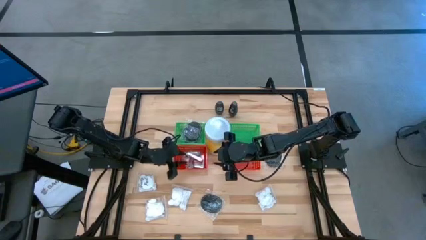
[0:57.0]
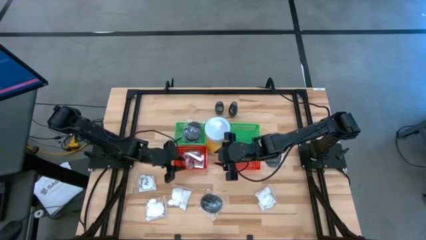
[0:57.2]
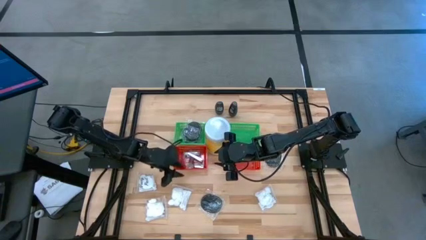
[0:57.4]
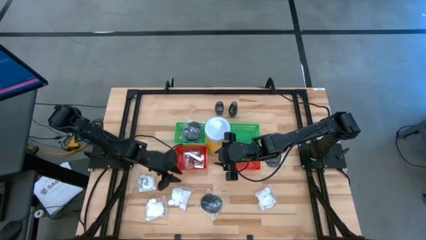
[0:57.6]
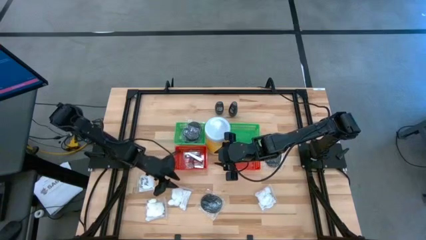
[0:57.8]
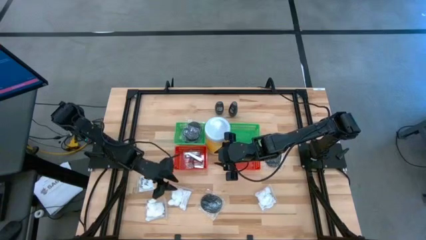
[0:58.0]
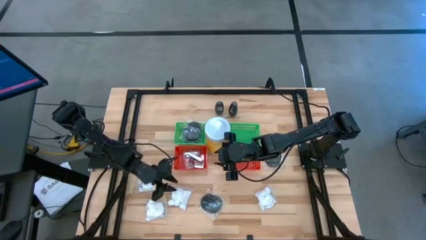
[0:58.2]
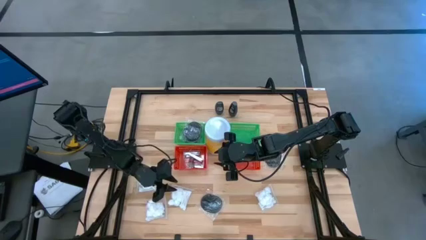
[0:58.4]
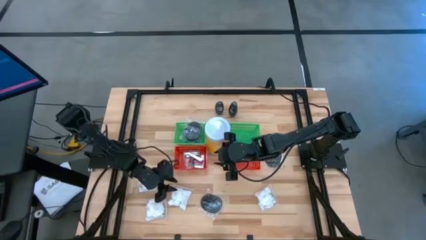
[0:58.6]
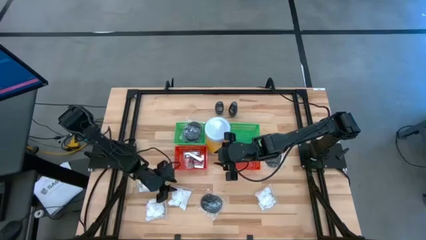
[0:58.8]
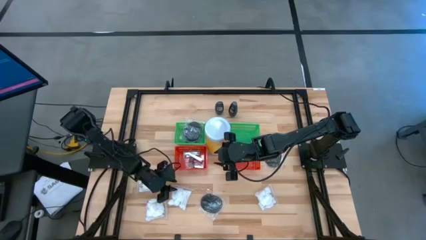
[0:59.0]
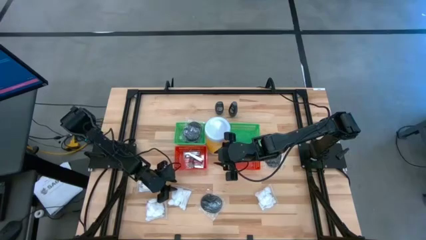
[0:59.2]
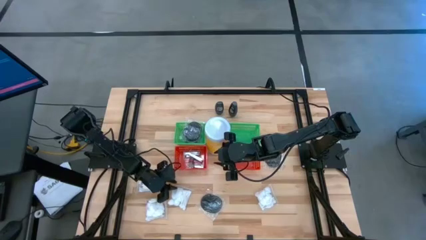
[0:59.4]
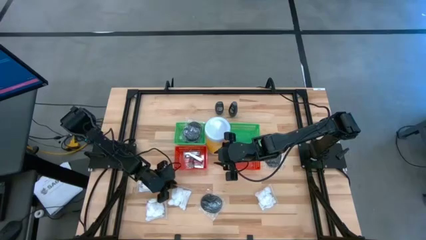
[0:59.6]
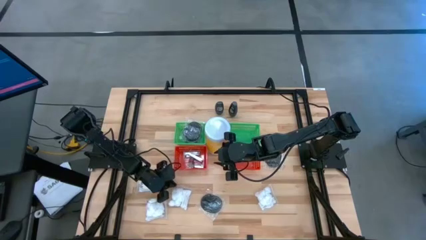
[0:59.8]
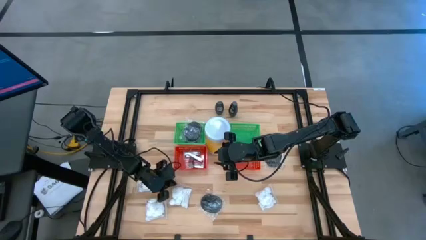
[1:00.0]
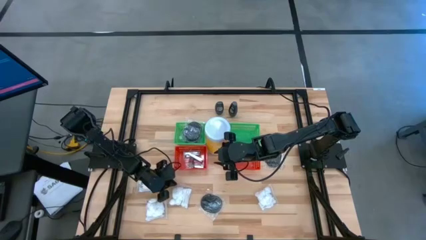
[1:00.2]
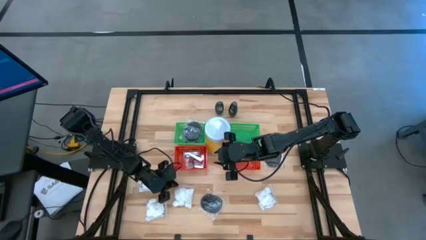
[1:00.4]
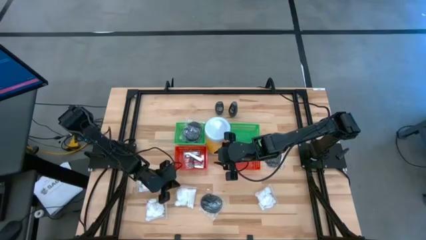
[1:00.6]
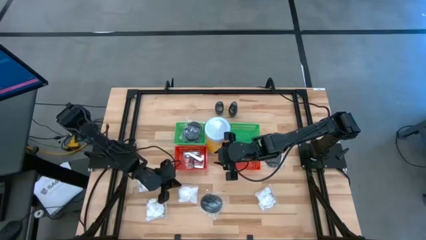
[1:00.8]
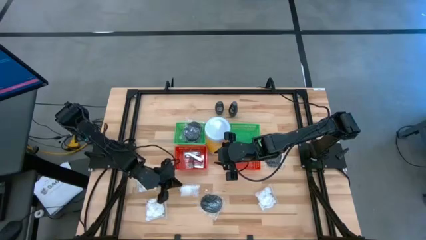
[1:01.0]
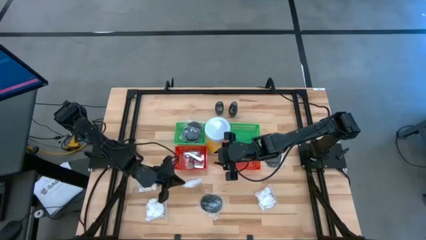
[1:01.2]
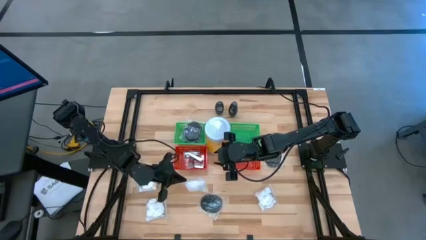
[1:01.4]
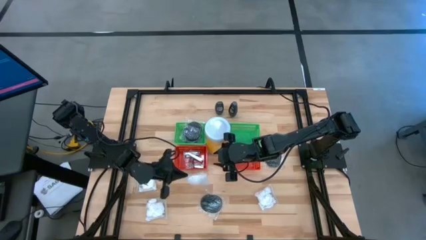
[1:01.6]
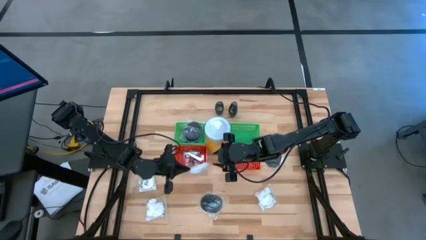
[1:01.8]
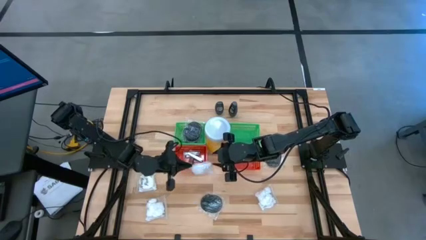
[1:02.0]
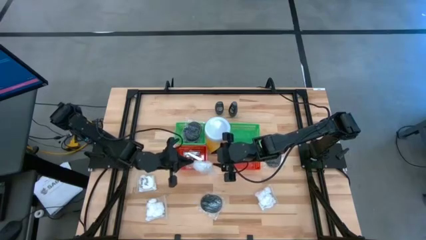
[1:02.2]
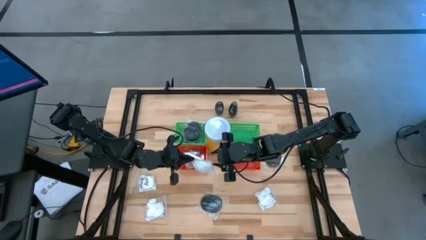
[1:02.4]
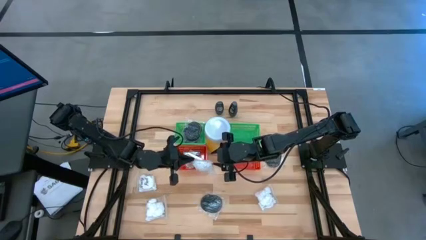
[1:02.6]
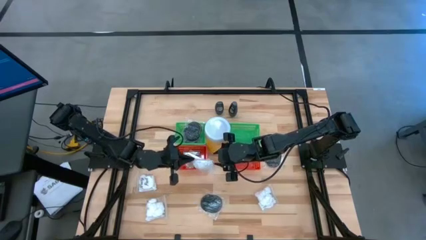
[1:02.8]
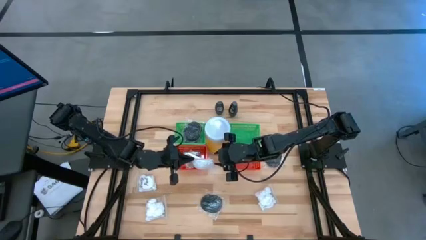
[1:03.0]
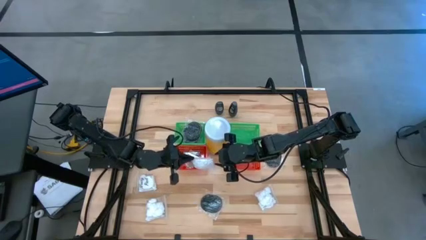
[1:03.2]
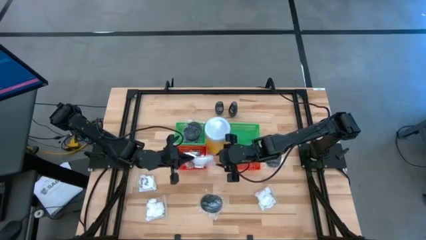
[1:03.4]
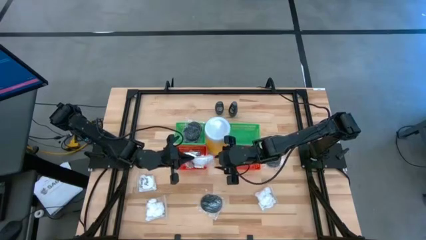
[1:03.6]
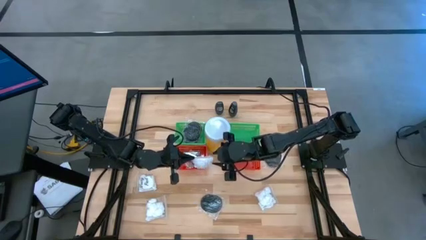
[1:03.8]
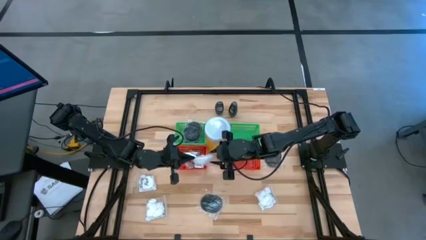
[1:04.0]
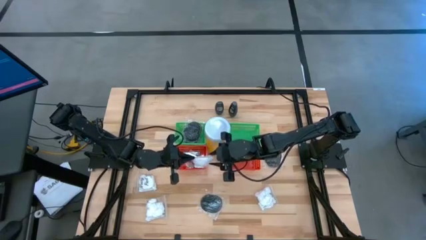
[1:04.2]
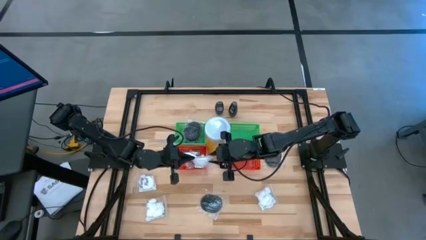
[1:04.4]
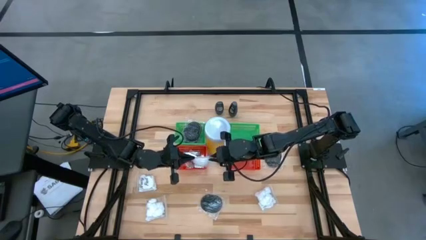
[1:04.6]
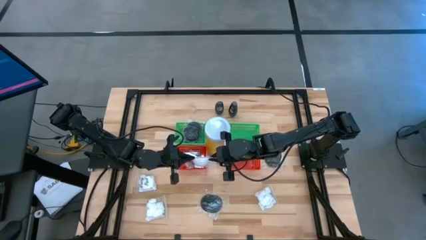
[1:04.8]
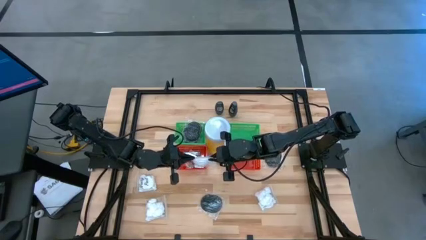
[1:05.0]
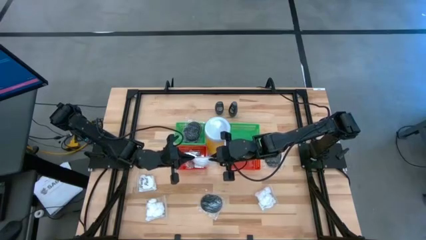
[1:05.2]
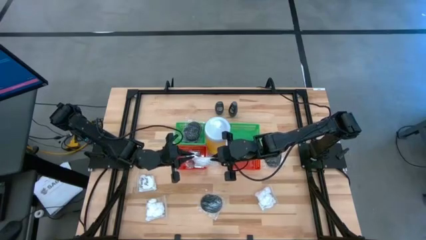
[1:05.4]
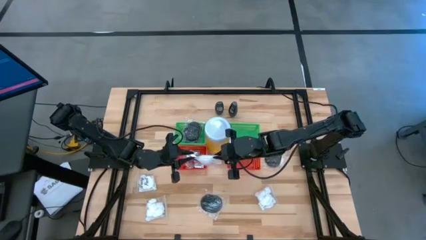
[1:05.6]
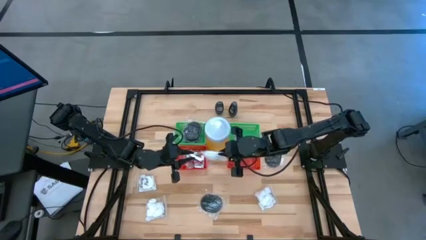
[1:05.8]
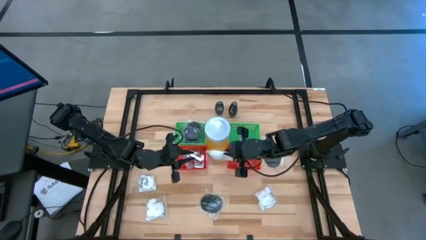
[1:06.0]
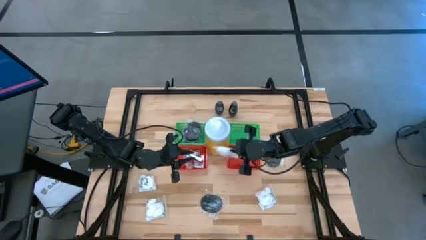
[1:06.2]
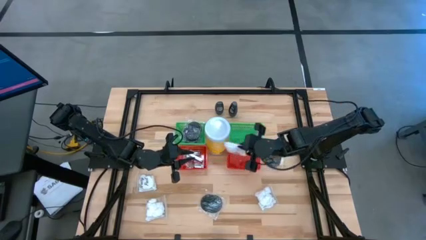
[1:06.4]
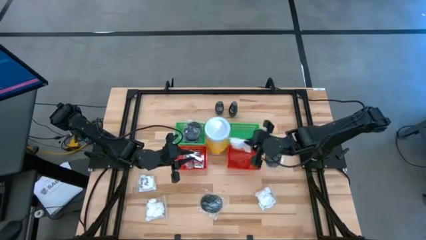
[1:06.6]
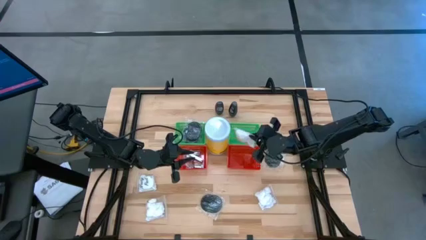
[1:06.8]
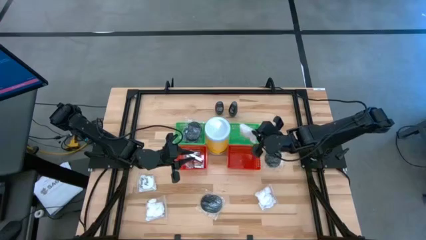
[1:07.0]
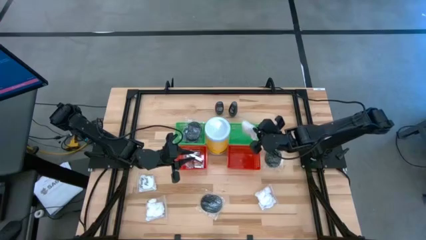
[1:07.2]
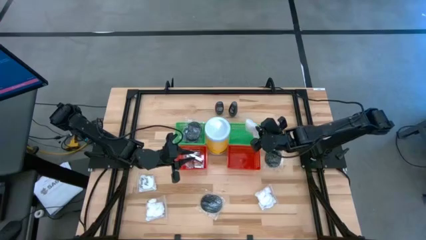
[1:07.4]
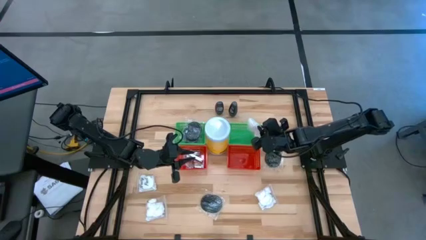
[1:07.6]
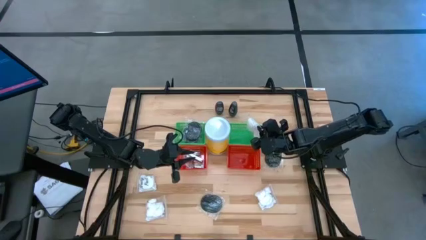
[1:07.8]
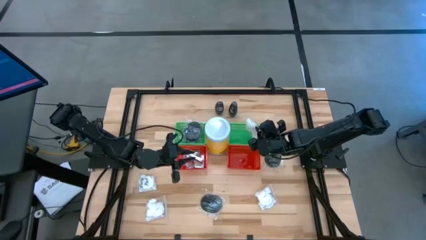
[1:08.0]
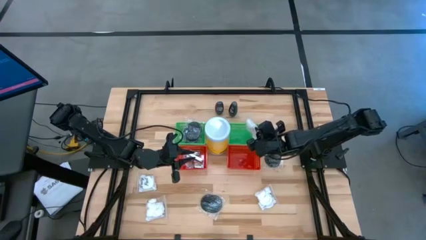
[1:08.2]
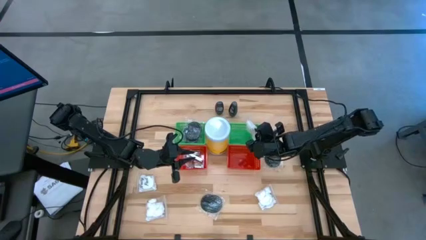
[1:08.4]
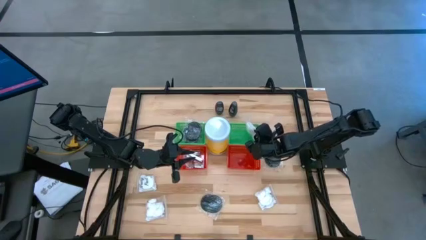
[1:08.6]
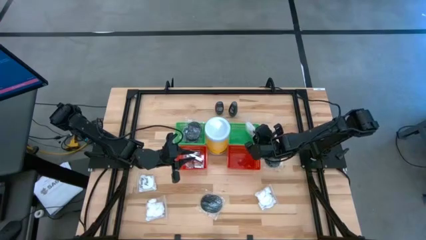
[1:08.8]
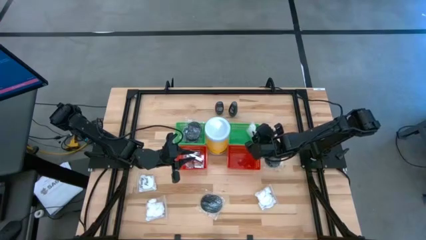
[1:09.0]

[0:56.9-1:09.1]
Task: Pick & Place Travel size toiletries
Put the vanity pack into the right green basket

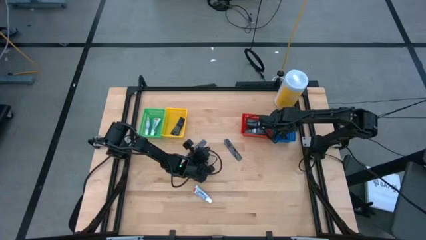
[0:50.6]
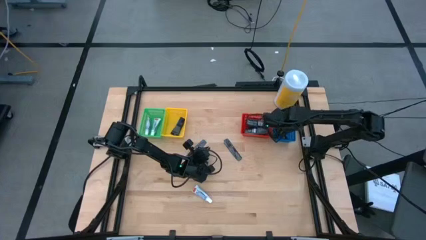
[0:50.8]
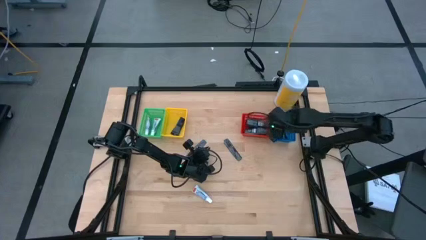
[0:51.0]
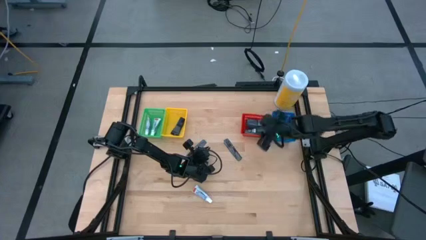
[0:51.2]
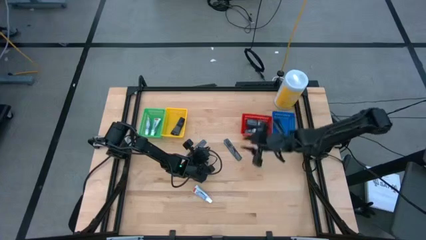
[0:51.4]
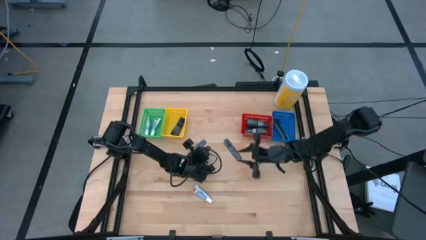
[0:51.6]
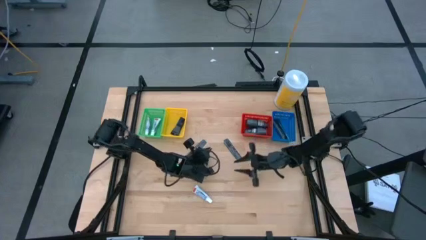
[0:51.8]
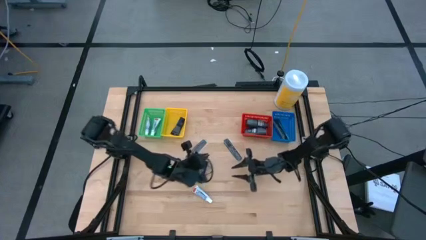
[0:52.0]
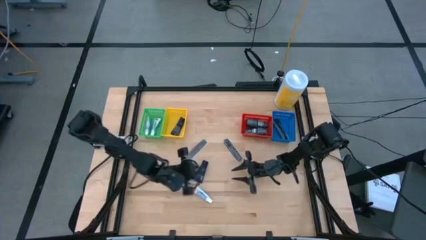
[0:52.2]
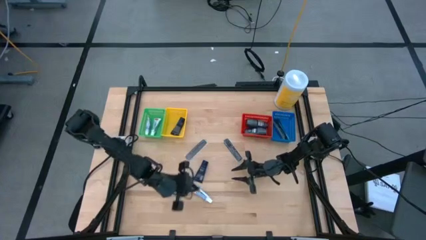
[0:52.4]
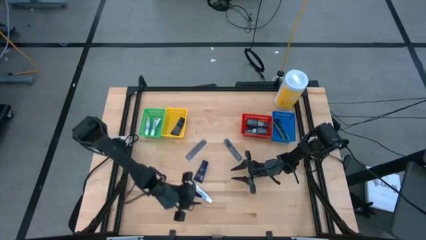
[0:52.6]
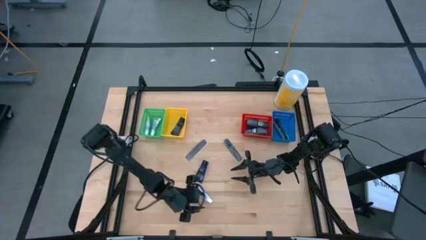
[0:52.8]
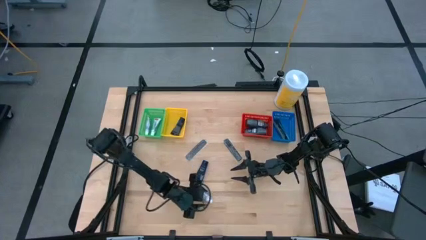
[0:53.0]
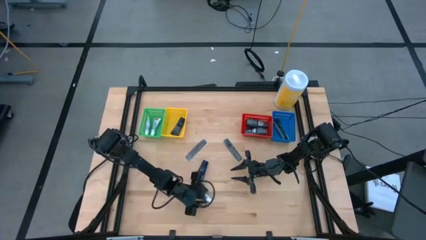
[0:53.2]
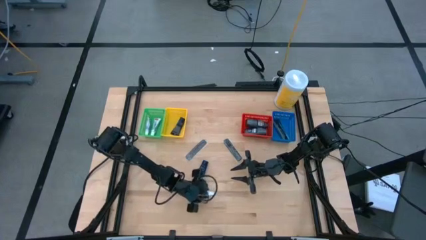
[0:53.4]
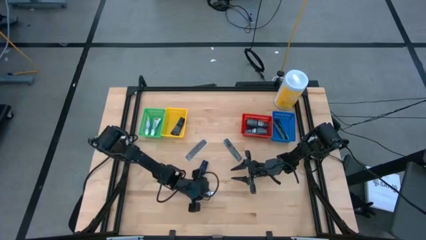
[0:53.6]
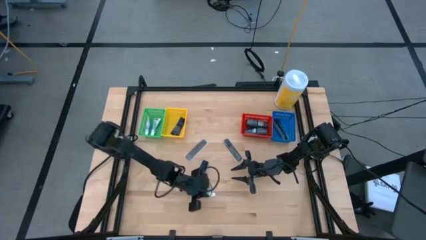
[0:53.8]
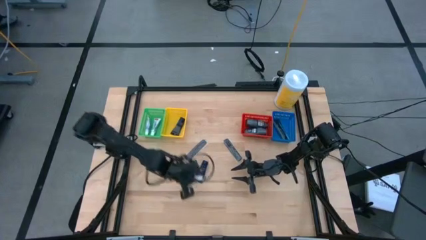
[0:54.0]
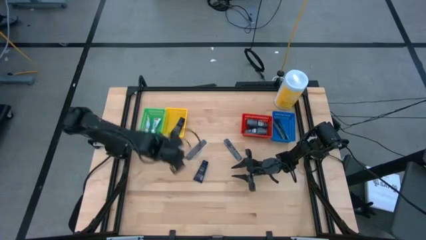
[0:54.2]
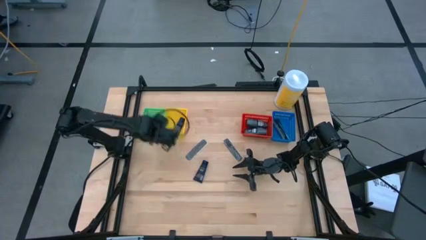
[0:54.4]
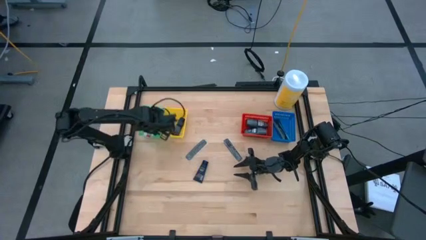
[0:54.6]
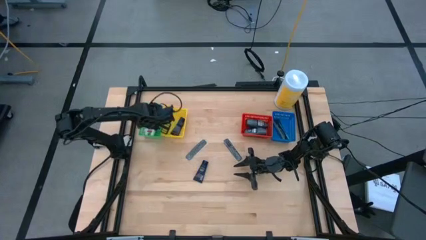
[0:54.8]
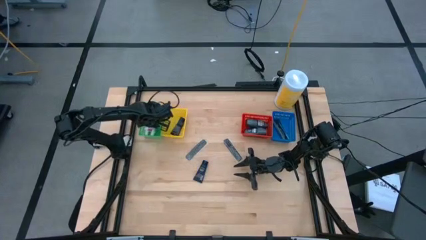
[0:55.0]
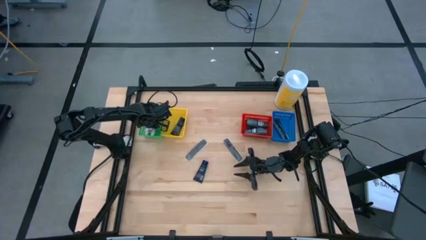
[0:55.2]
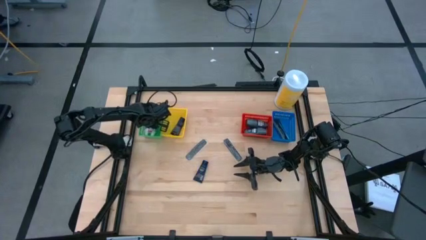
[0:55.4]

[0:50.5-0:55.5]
Task: Pick & Place Travel size toiletries
Put the toothpaste into the green bin
